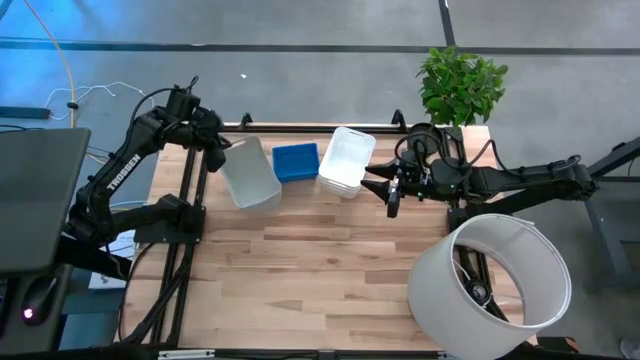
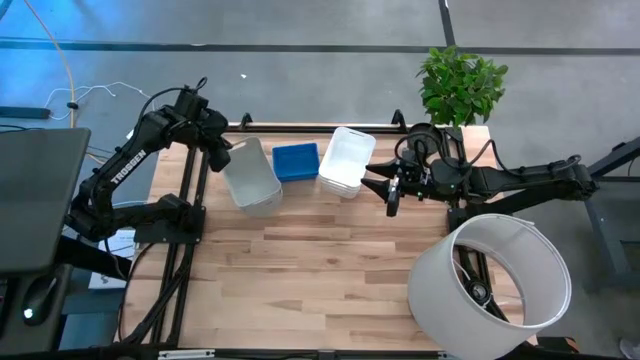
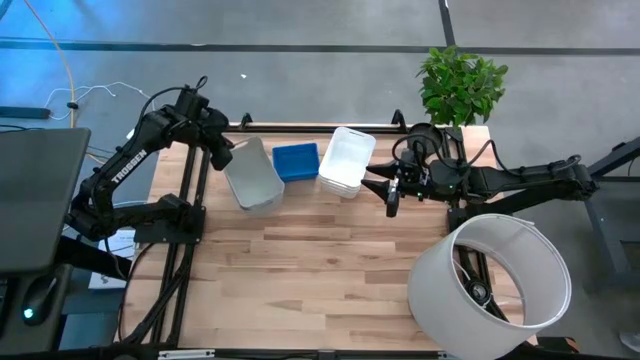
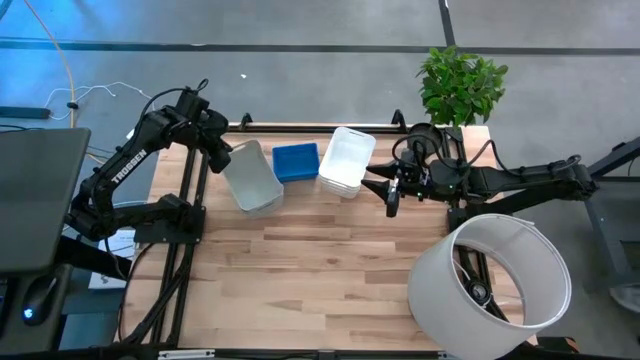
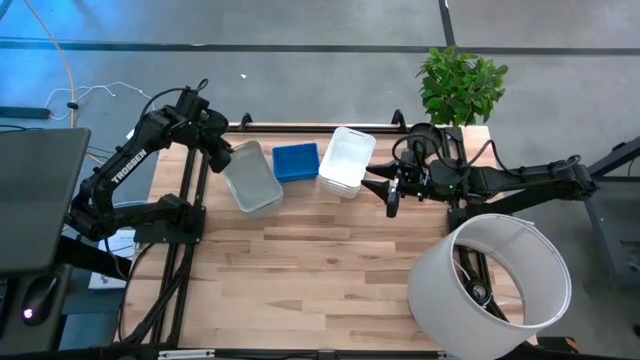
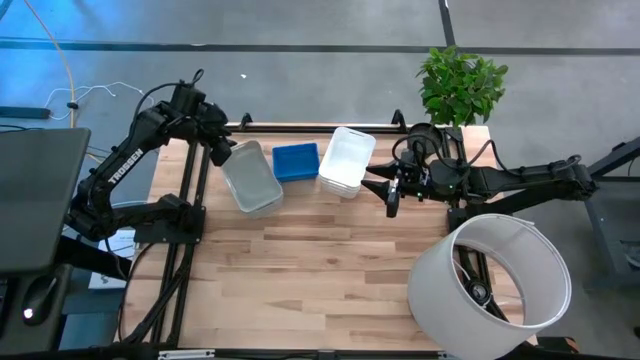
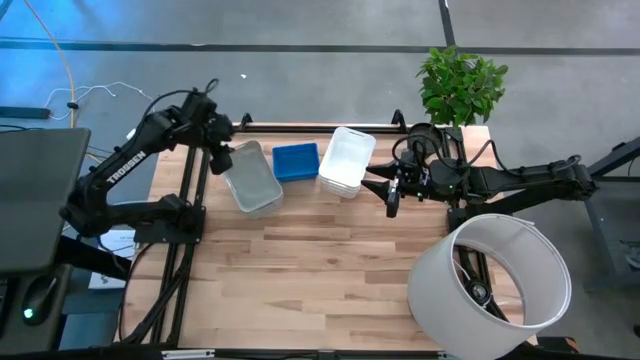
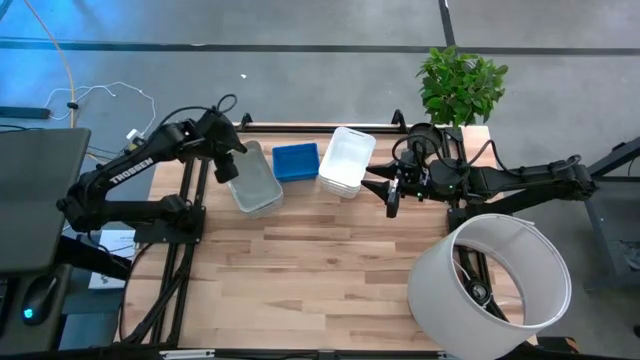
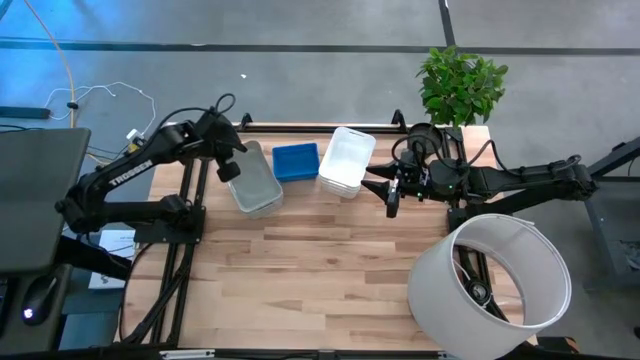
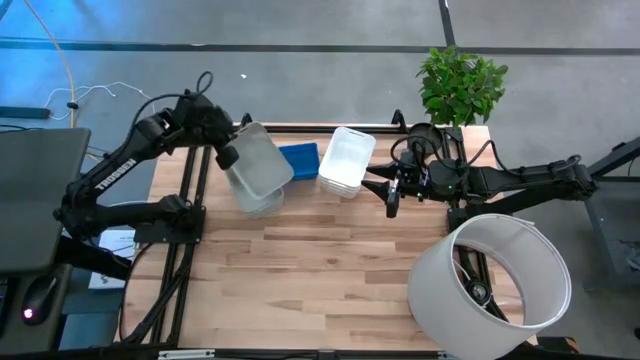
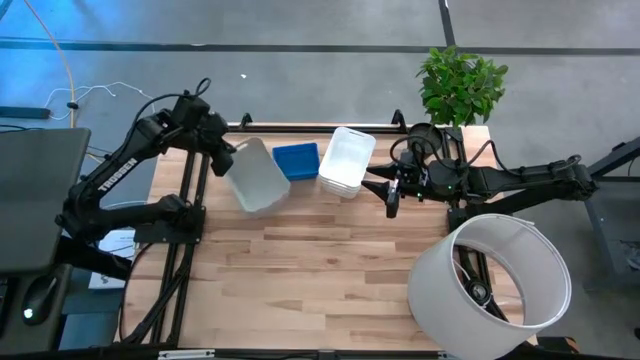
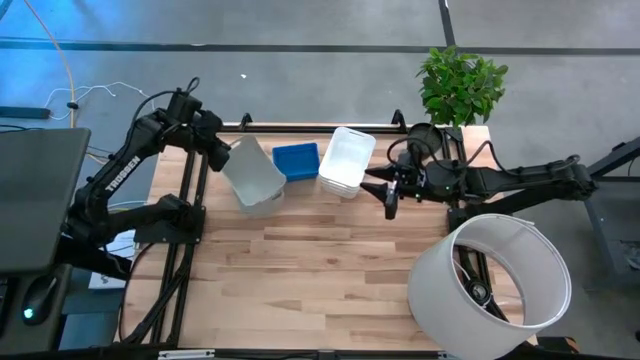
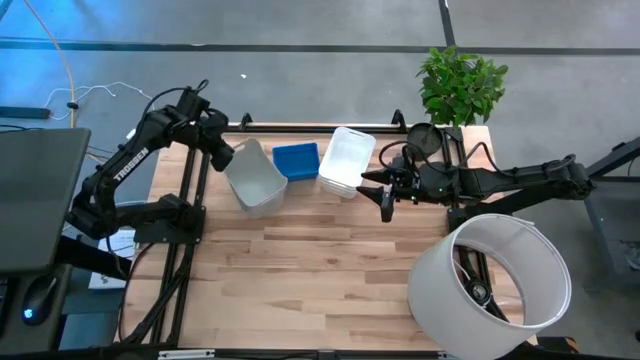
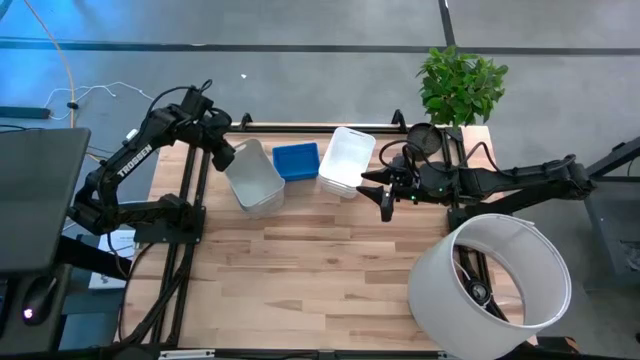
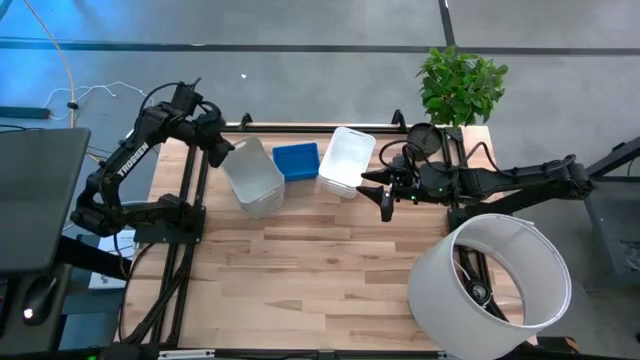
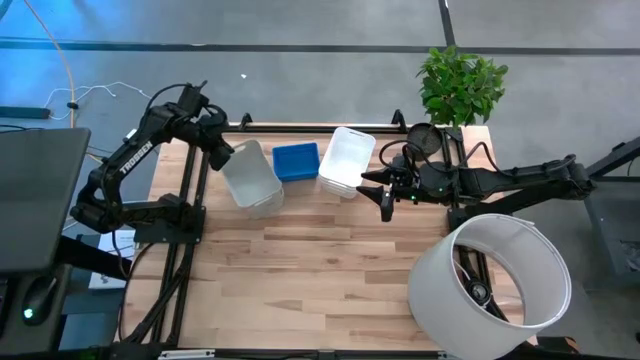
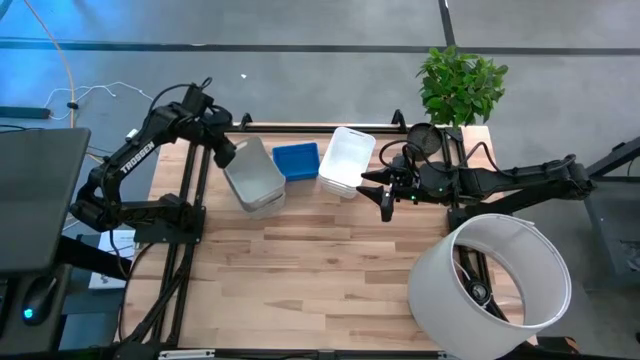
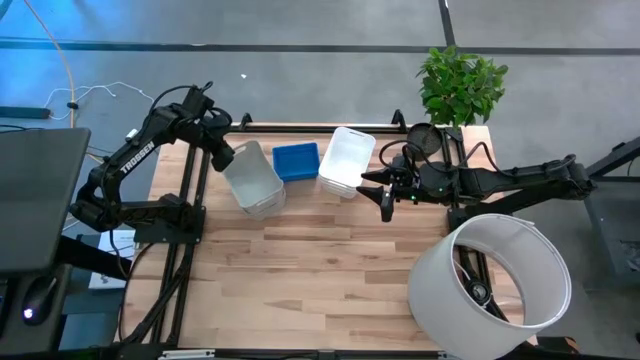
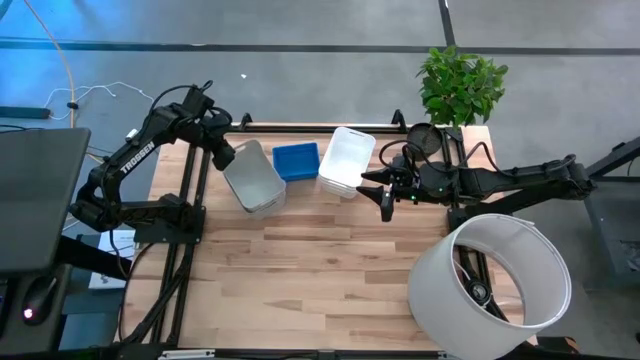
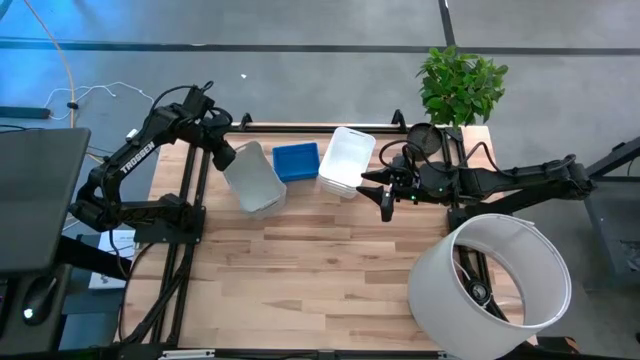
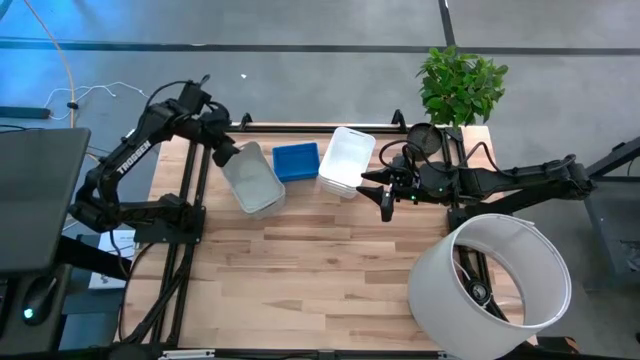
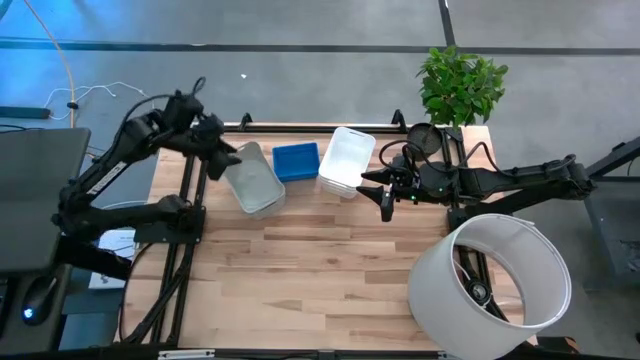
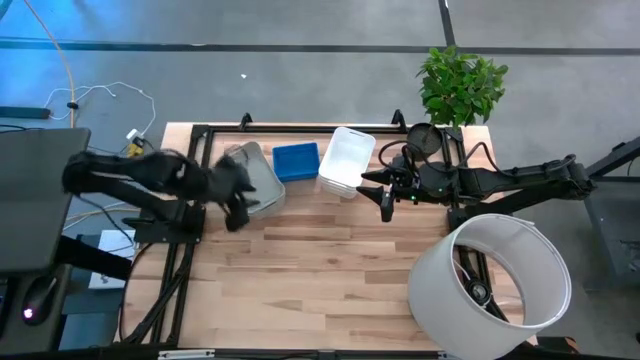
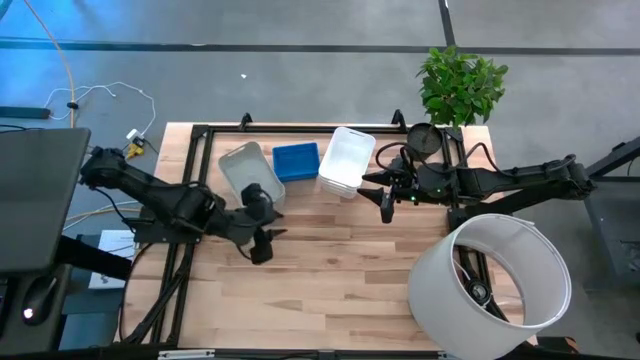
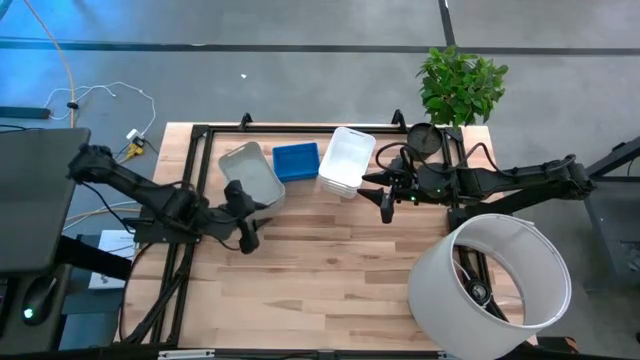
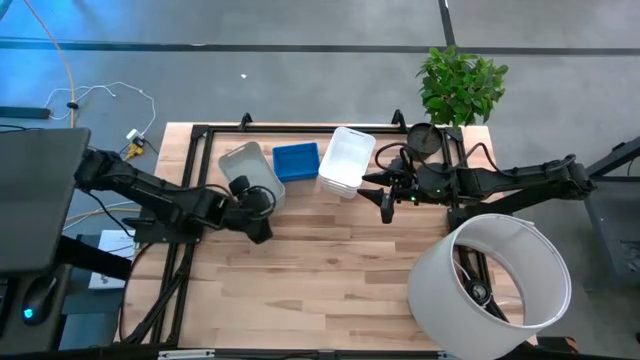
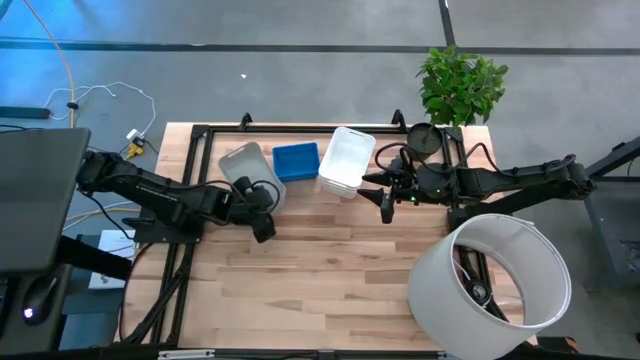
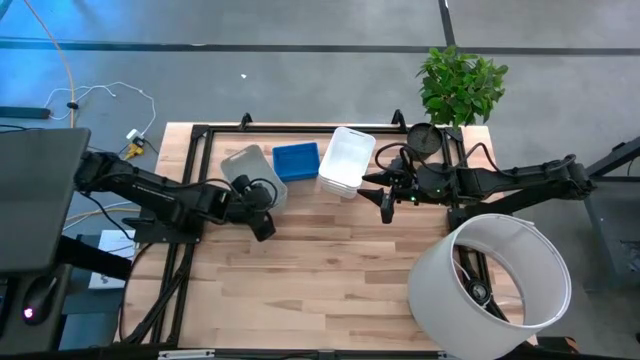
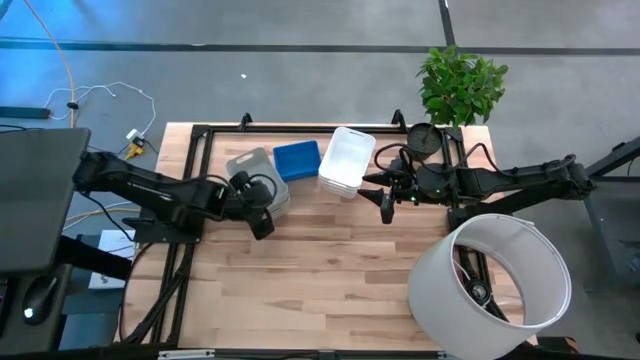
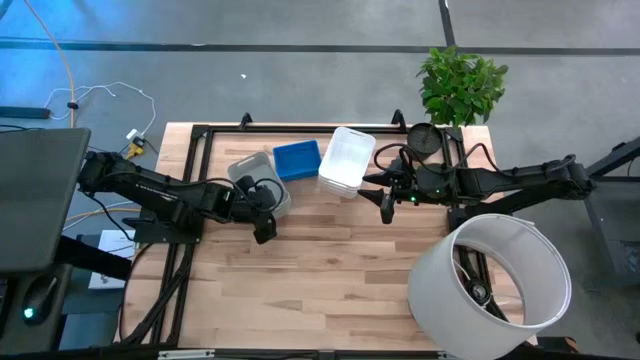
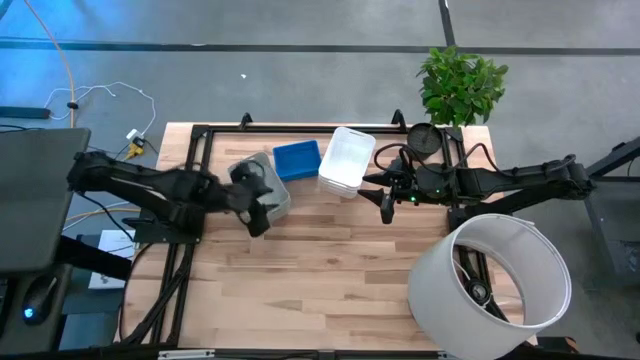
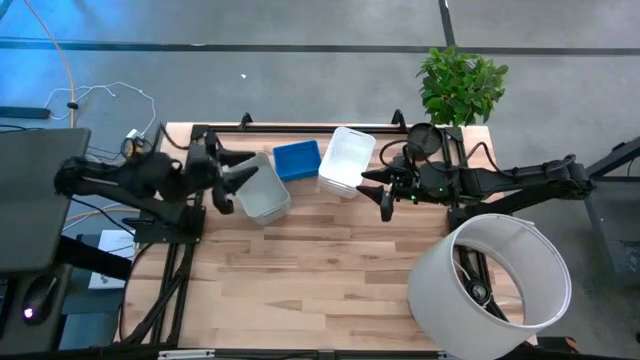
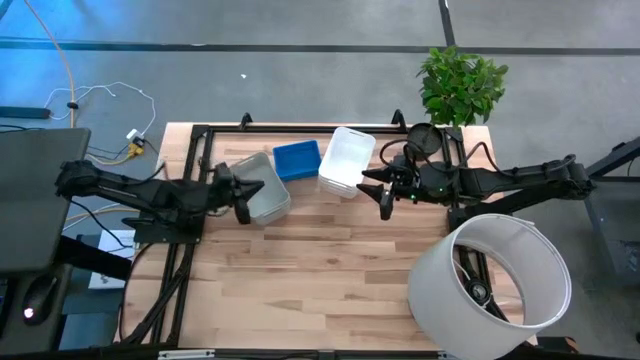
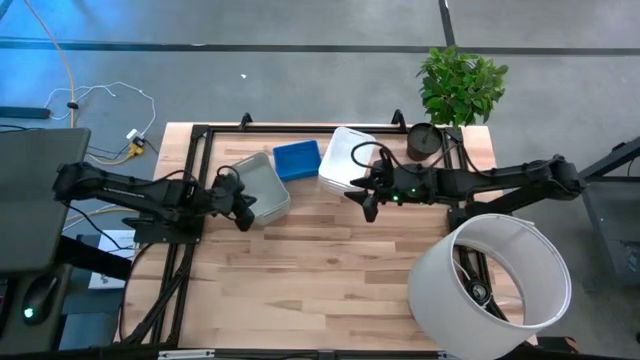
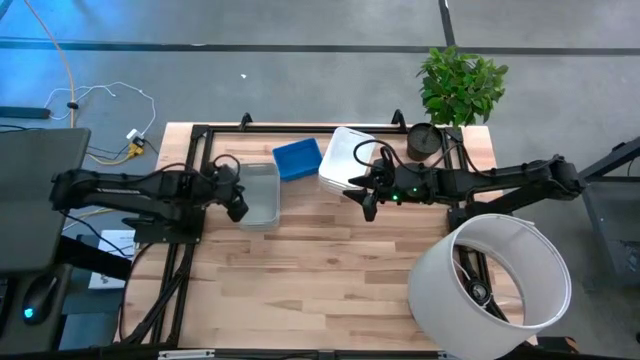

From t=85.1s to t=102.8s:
Stack the bottom gray bin on the top gray bin

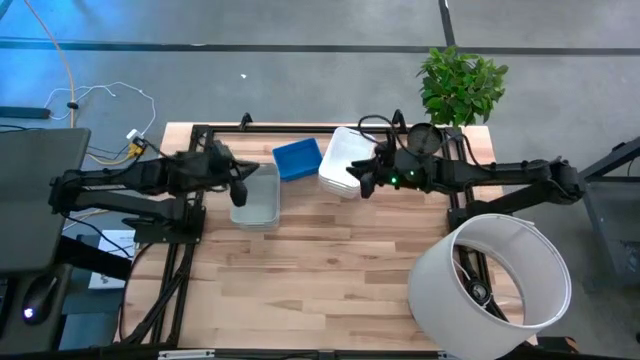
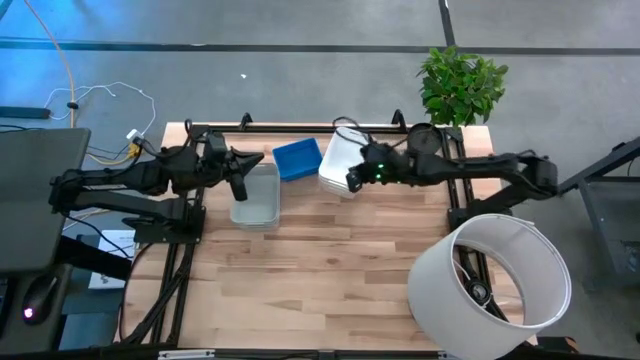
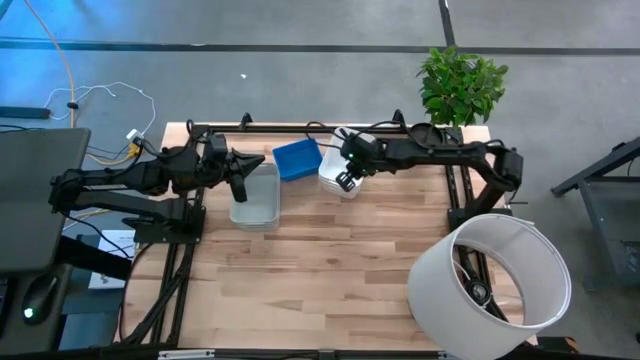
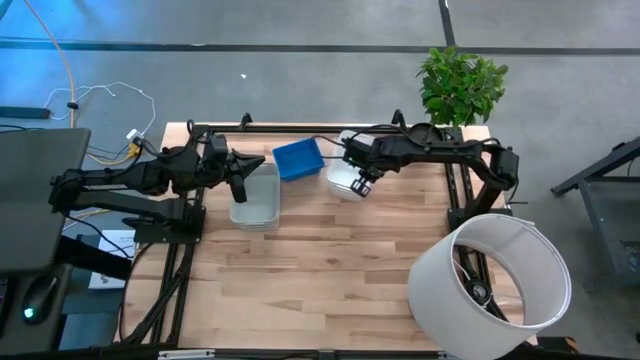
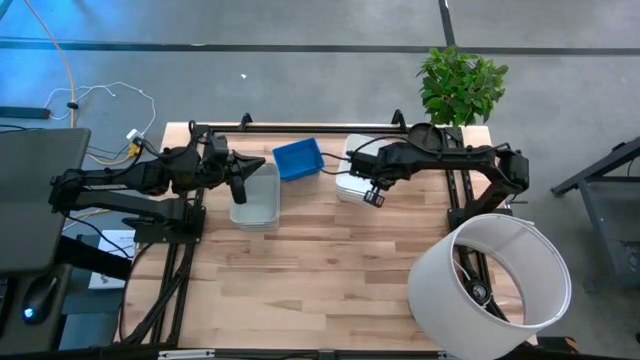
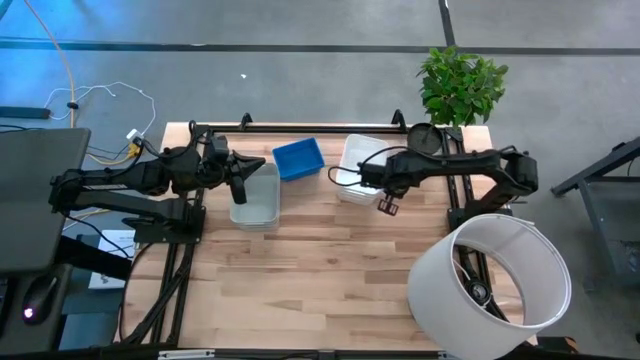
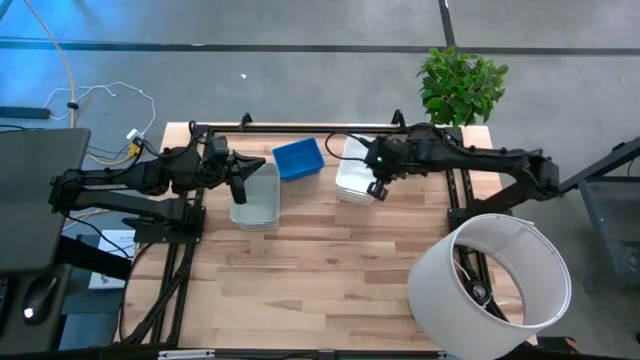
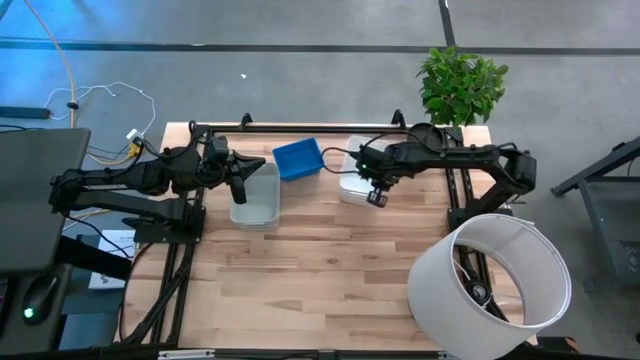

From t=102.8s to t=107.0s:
Adjust the white bins
